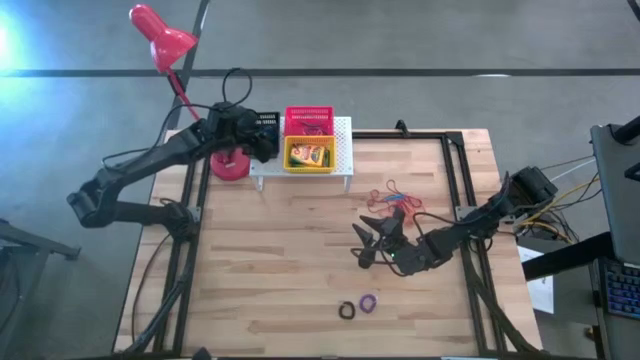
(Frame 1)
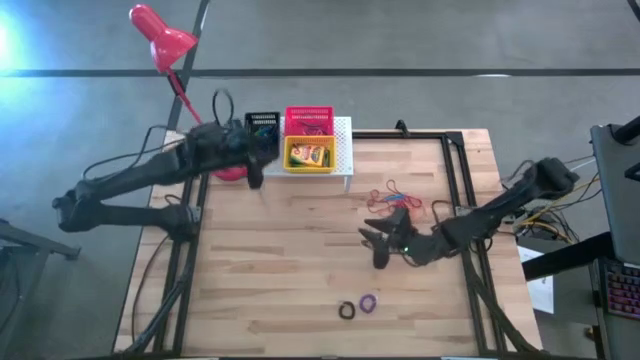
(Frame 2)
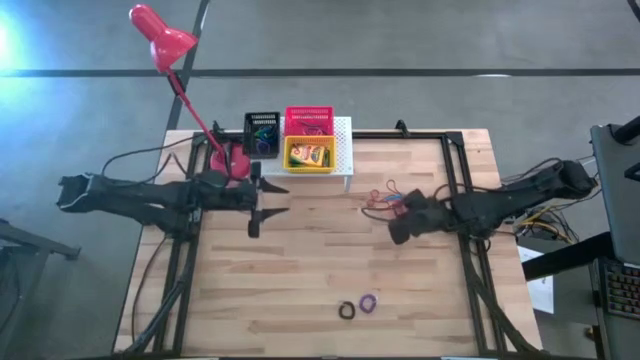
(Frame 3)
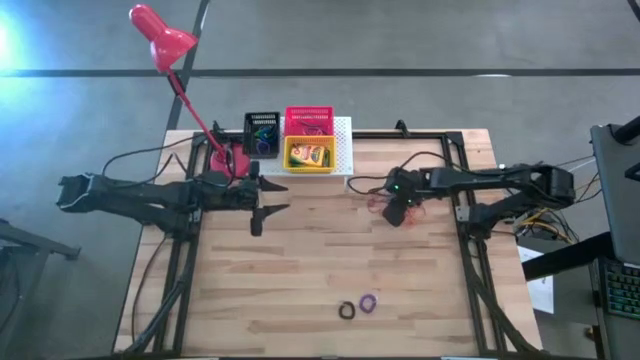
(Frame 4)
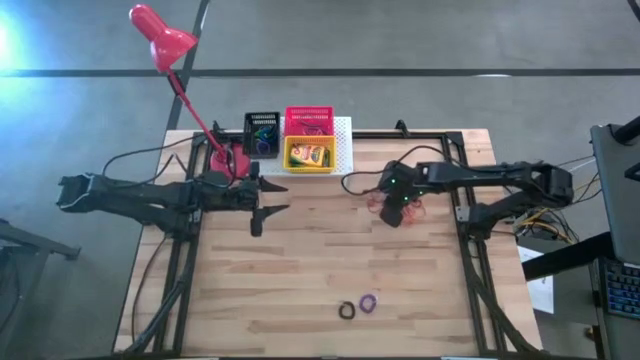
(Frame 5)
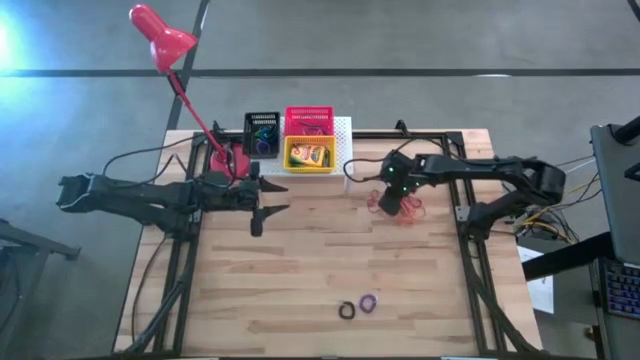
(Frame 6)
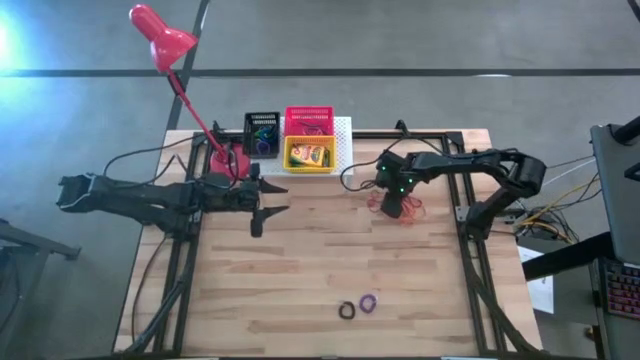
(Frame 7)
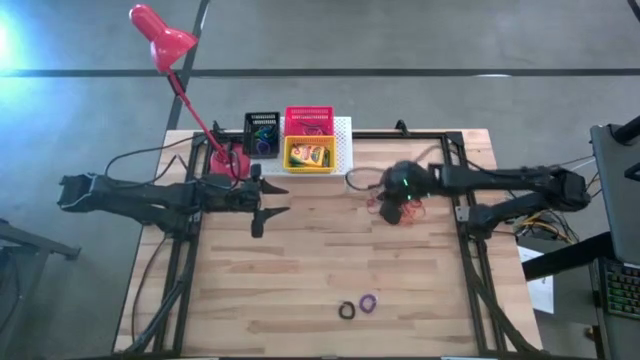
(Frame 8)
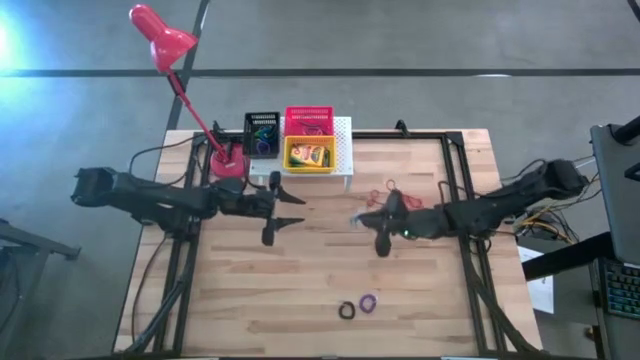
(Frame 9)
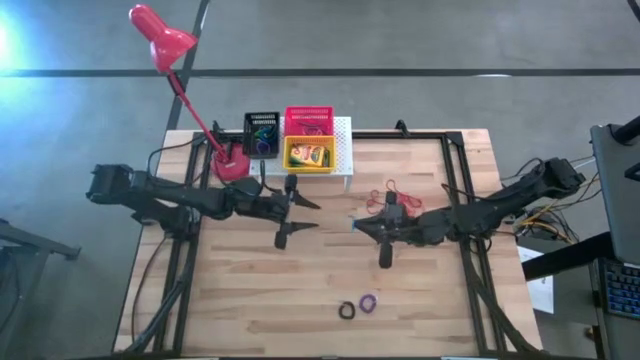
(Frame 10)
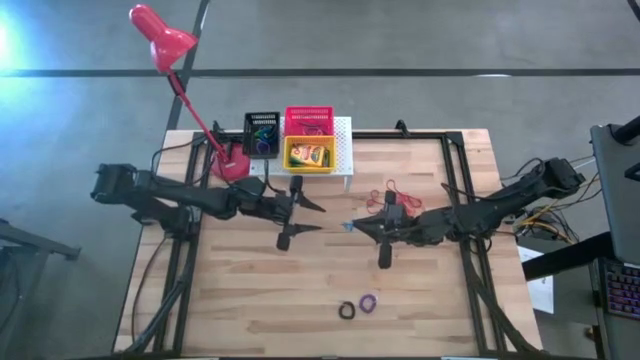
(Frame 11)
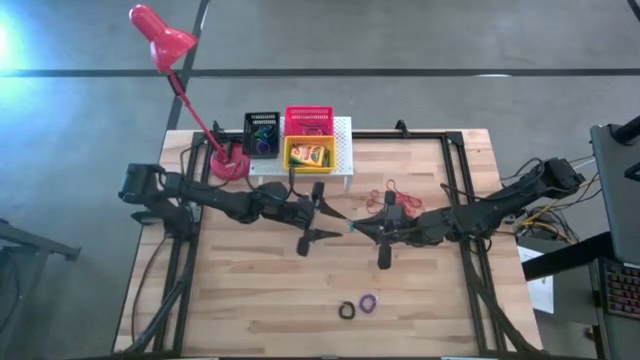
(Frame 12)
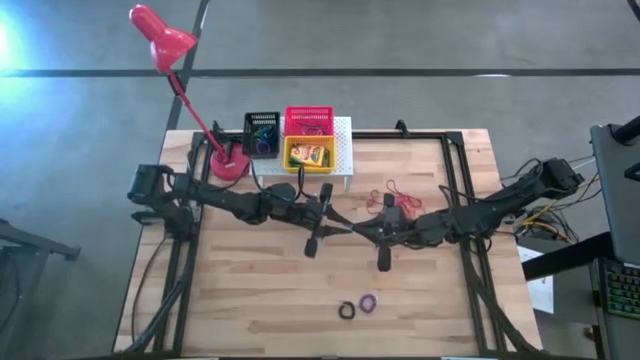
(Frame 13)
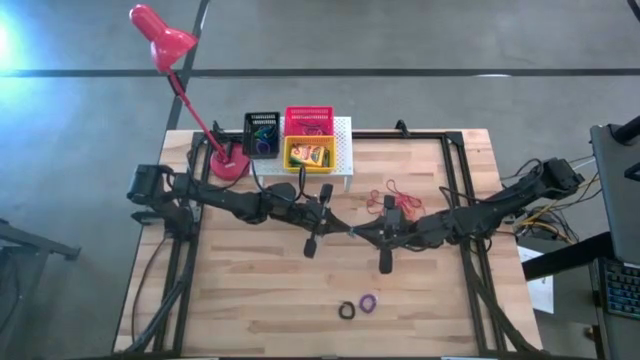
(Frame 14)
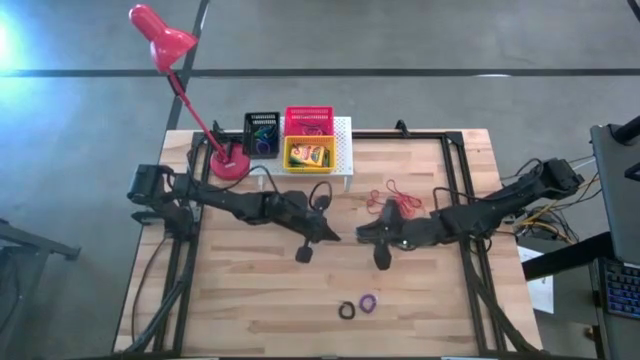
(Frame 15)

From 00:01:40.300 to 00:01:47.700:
Task: Pick & Place Office Desk Supplies
Put the blue rubber band into the red bin on the shelf on the shelf

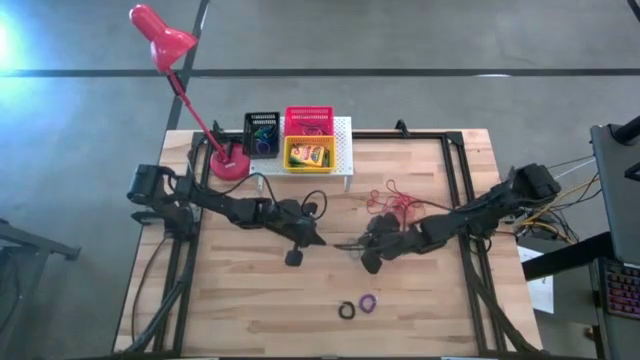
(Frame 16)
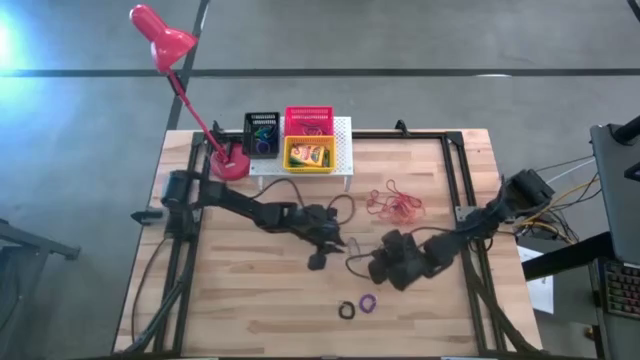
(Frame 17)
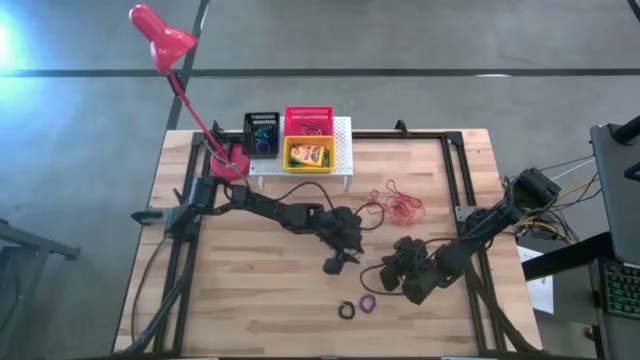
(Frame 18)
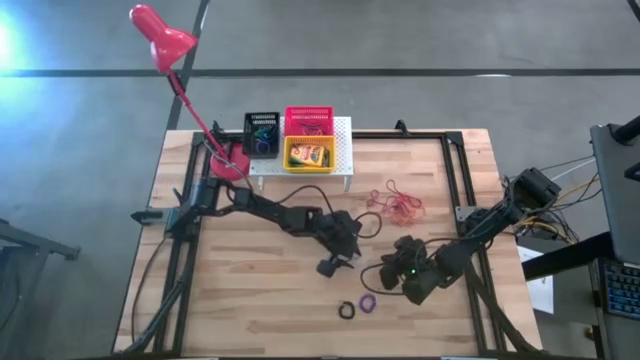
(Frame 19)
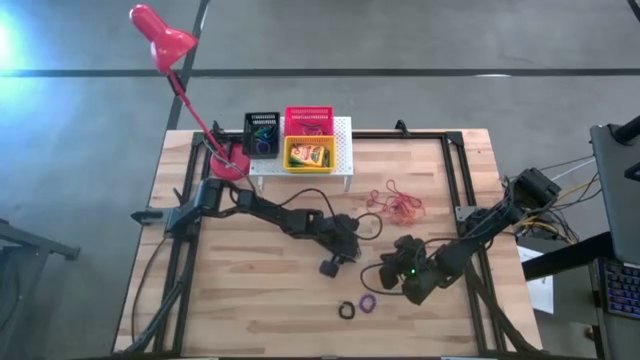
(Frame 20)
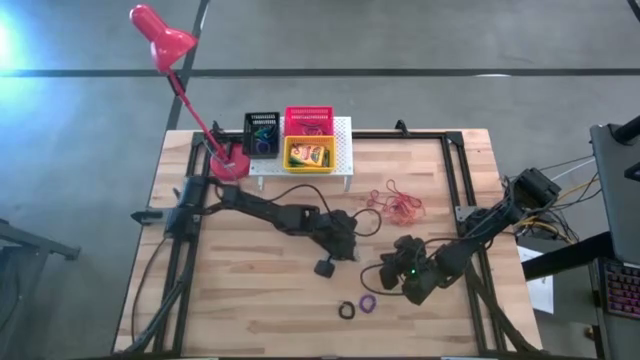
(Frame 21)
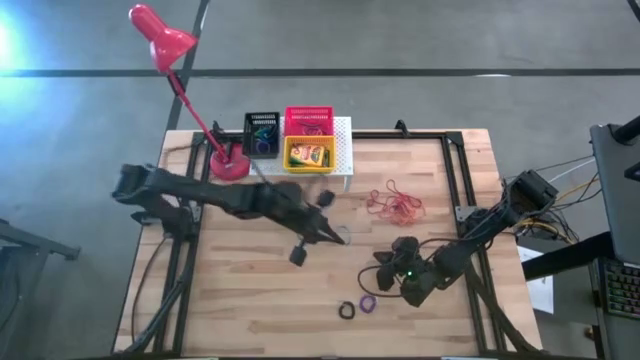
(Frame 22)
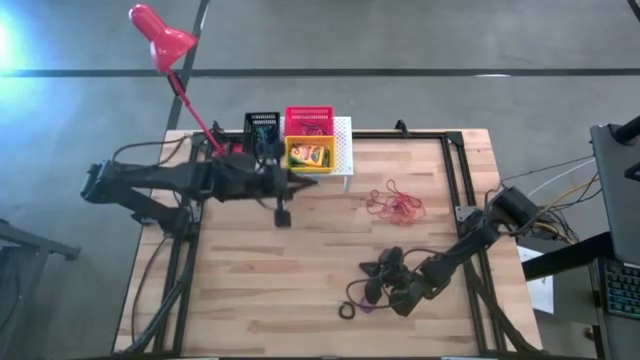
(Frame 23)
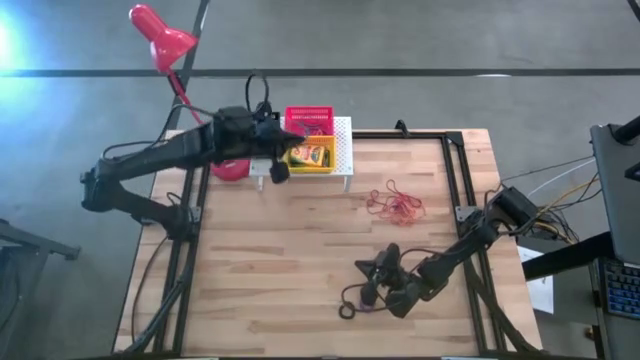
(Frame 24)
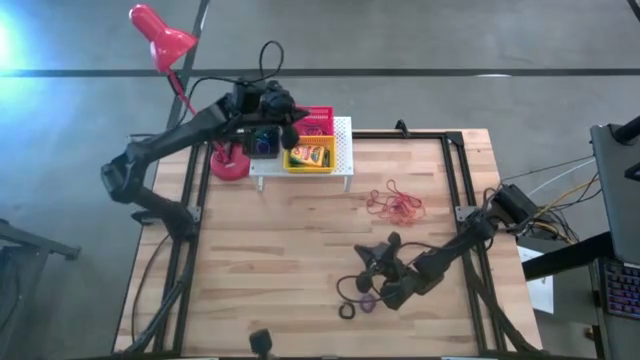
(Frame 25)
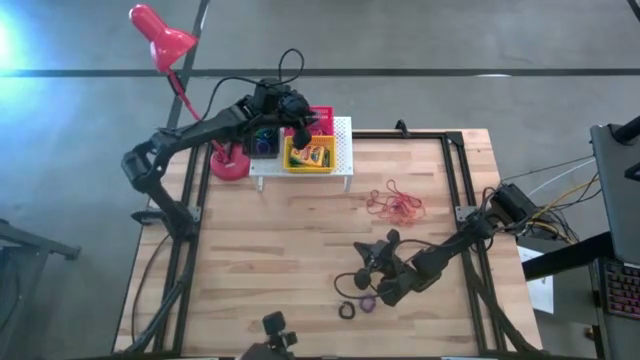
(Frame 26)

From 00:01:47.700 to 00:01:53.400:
Put the blue rubber band into the red bin on the shelf on the shelf

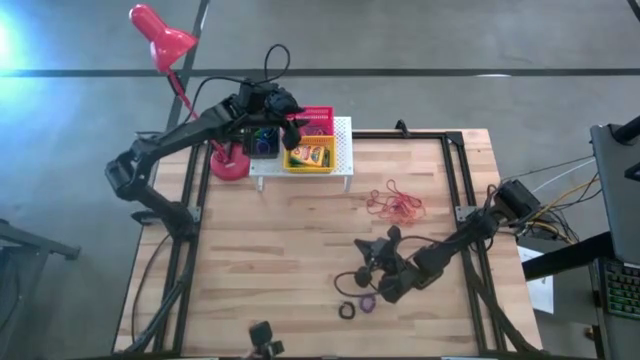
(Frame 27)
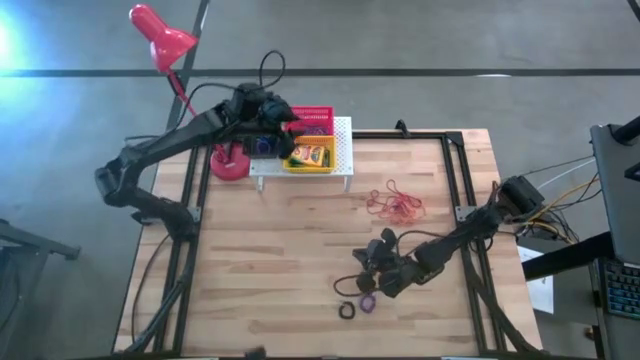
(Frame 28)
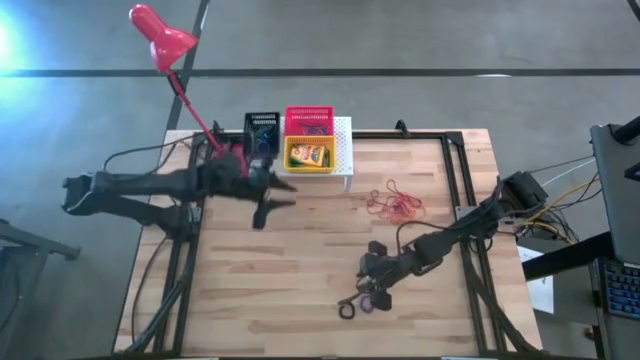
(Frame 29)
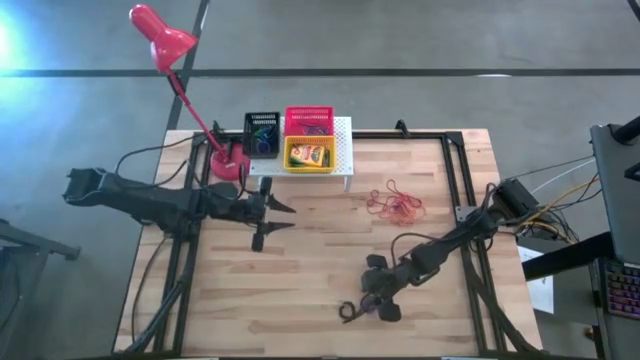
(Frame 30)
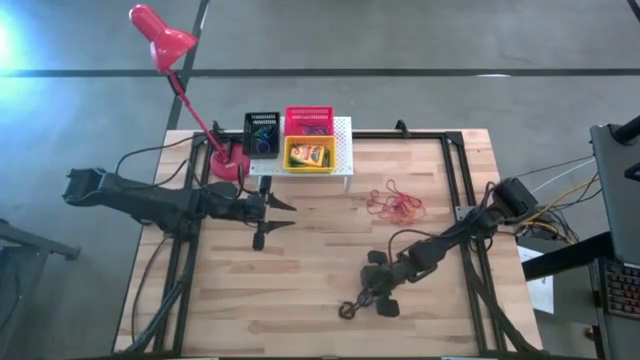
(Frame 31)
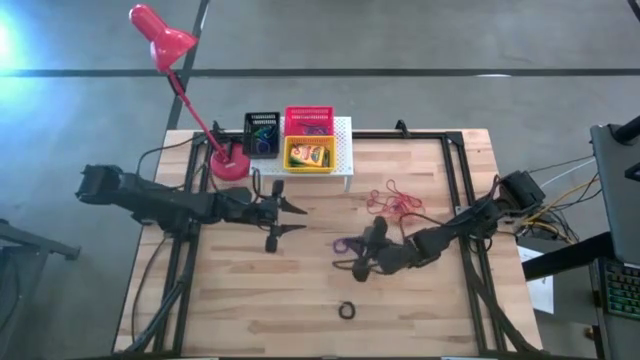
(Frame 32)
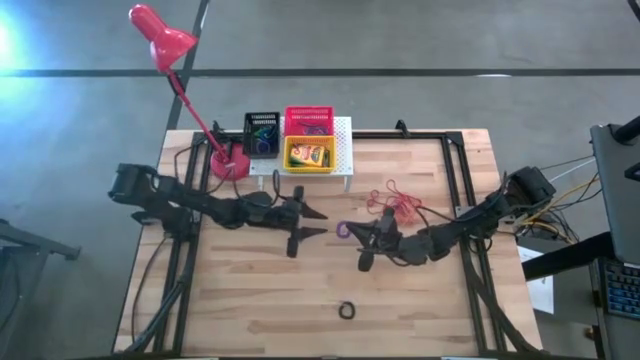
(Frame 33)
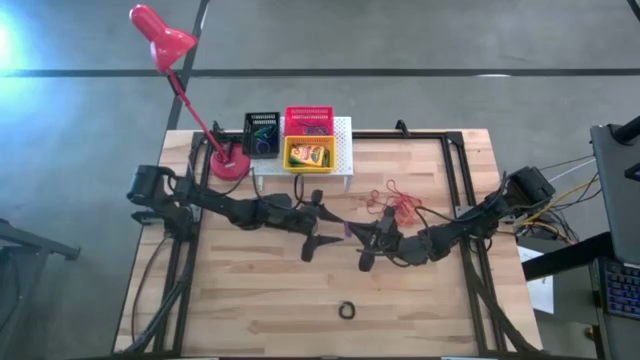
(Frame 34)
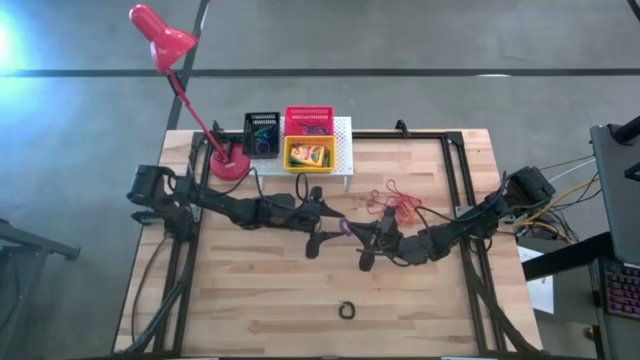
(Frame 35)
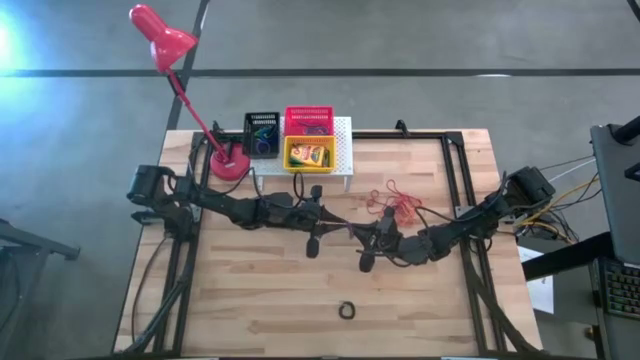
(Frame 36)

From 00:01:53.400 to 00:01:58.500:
Put the purple spring keychain into the black bin on the shelf

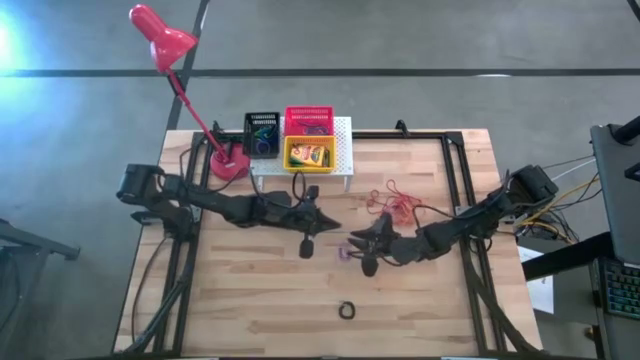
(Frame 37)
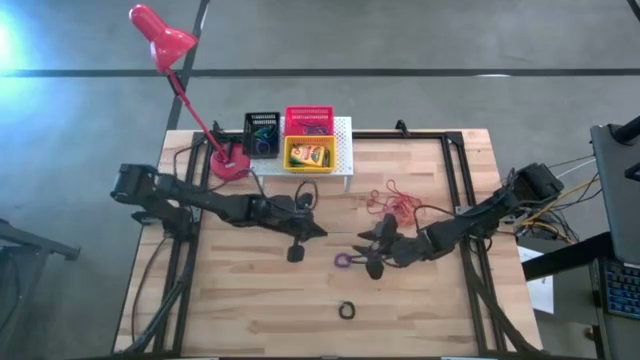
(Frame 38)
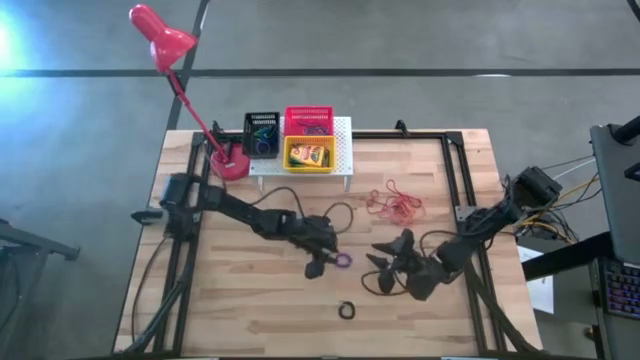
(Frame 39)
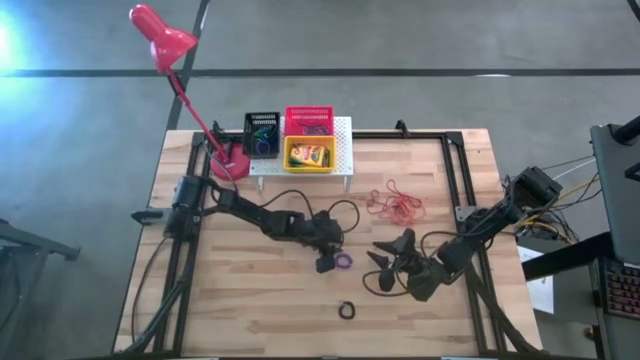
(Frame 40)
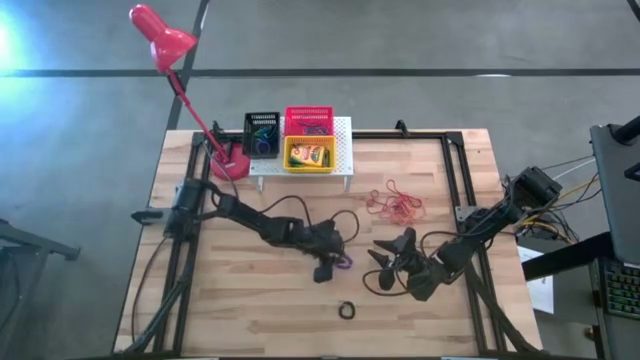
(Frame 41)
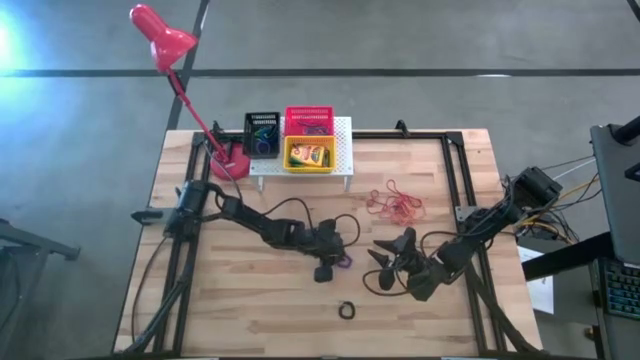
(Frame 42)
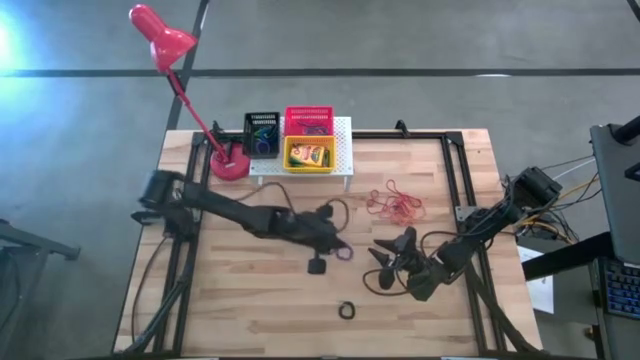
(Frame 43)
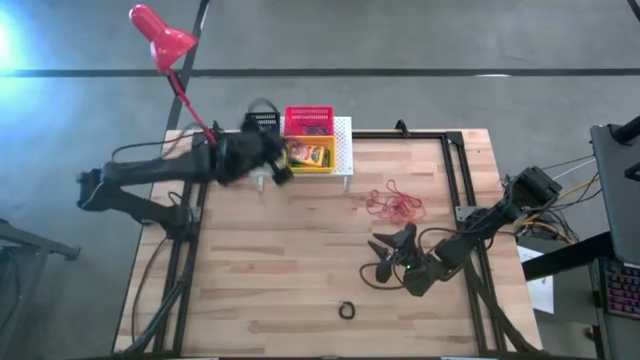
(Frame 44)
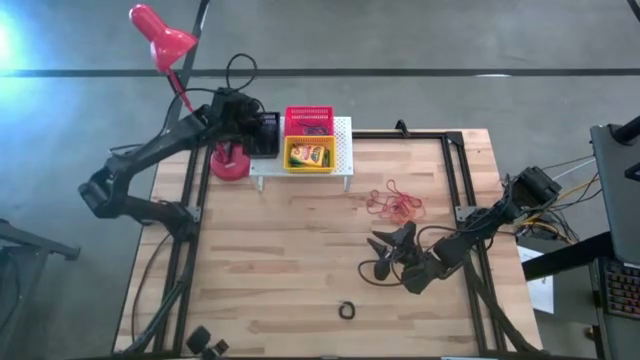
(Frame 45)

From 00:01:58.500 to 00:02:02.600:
Put the purple spring keychain into the black bin on the shelf
